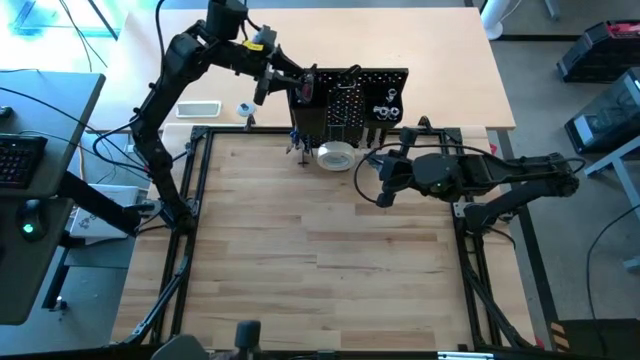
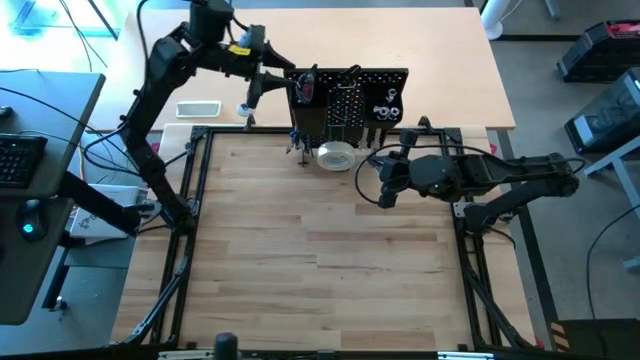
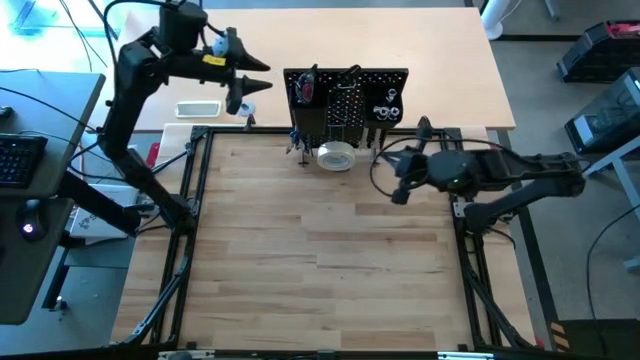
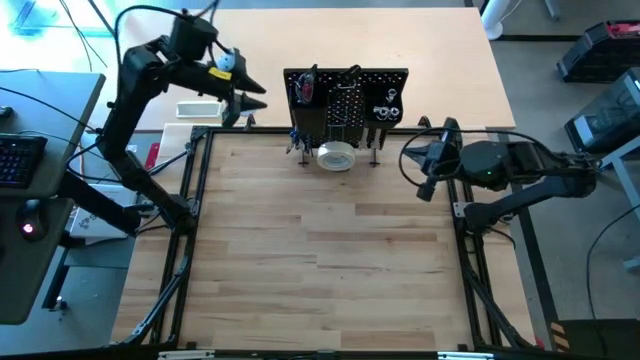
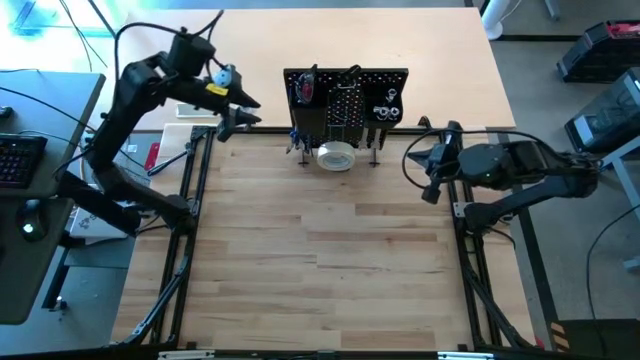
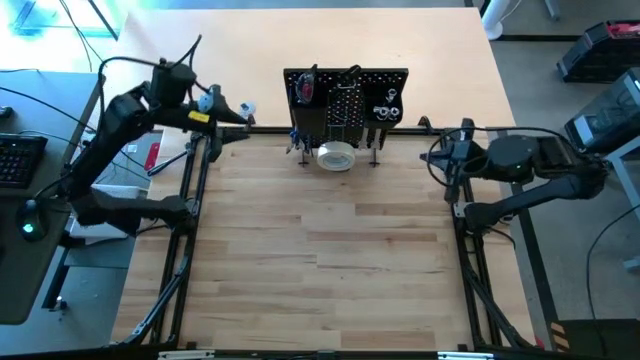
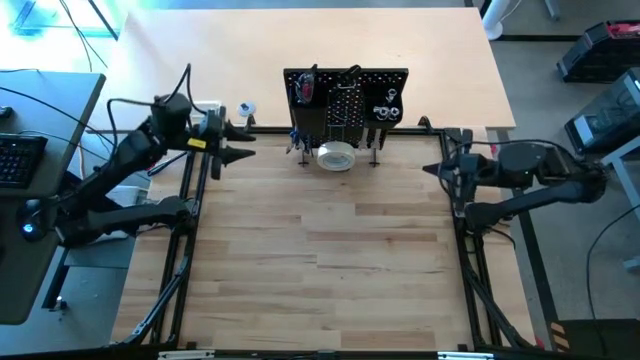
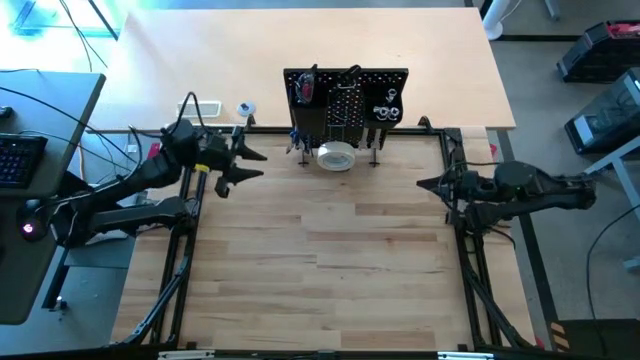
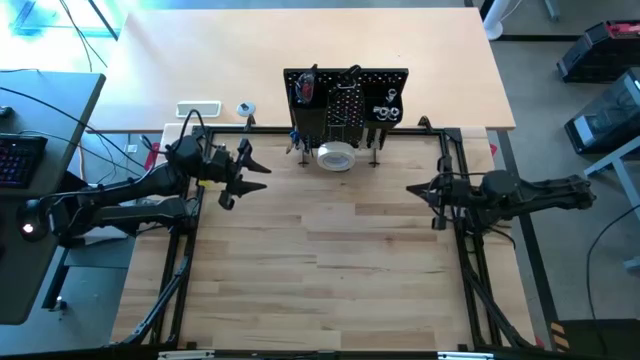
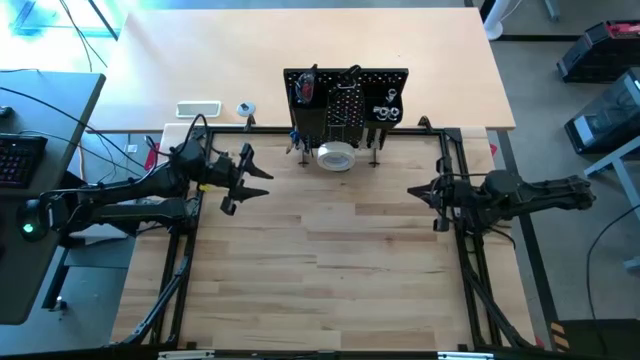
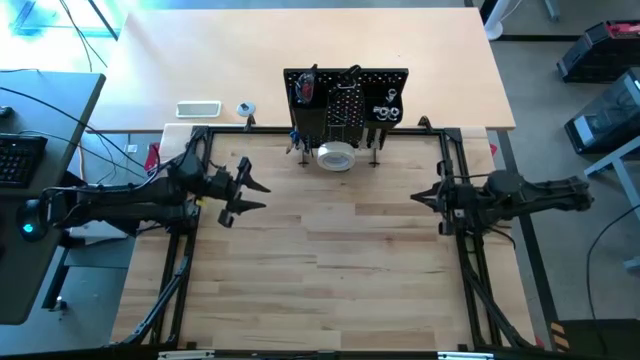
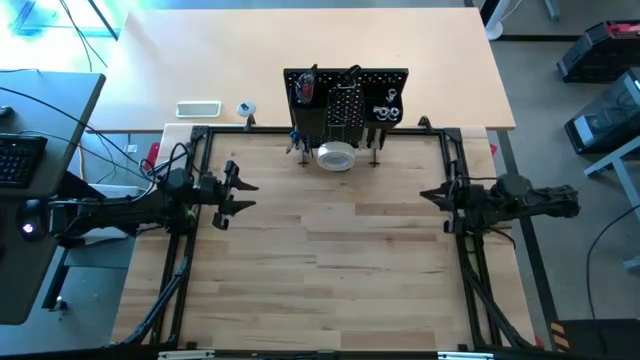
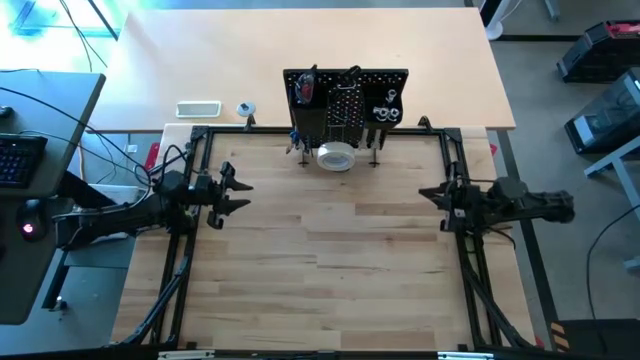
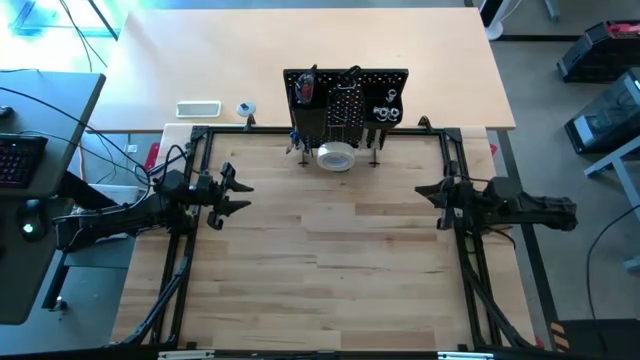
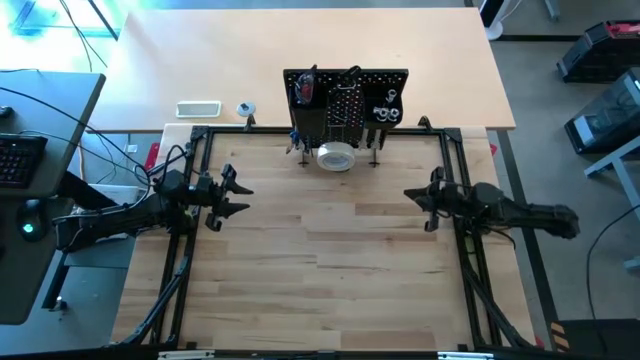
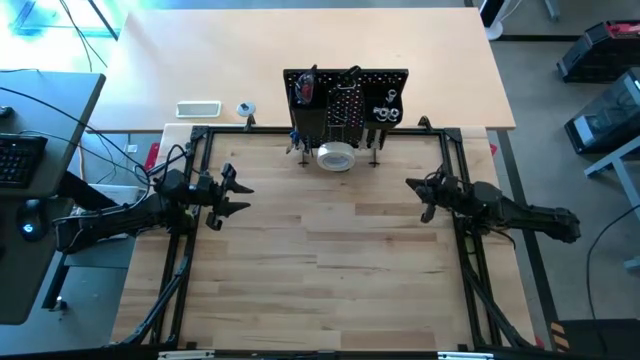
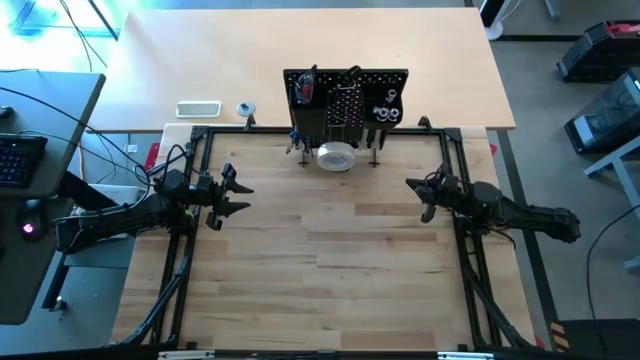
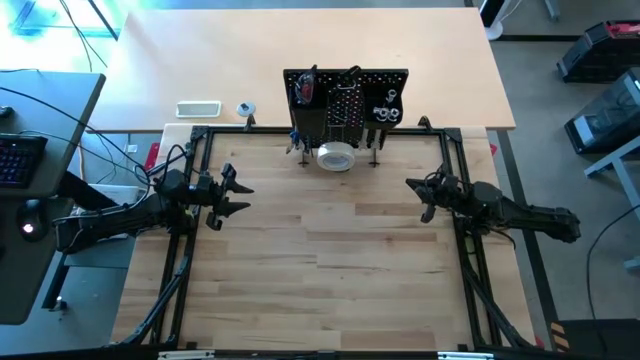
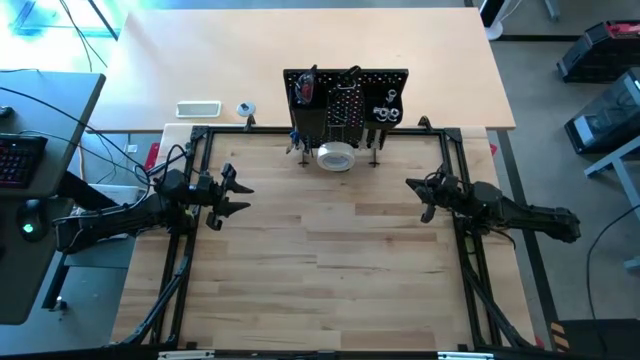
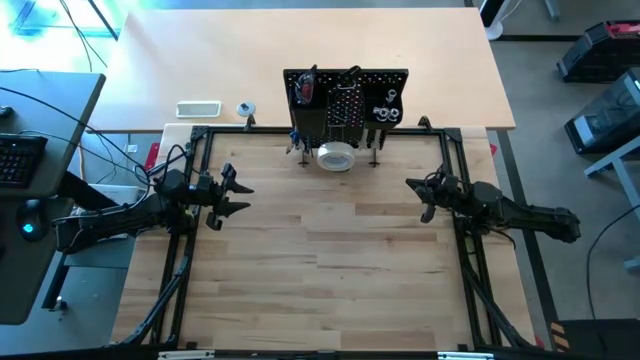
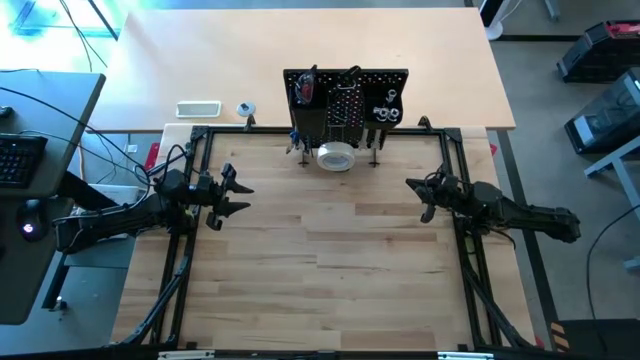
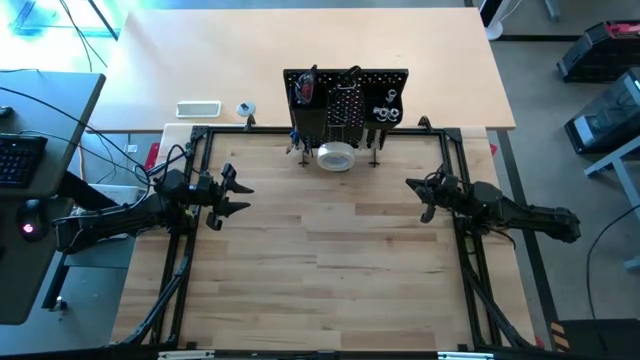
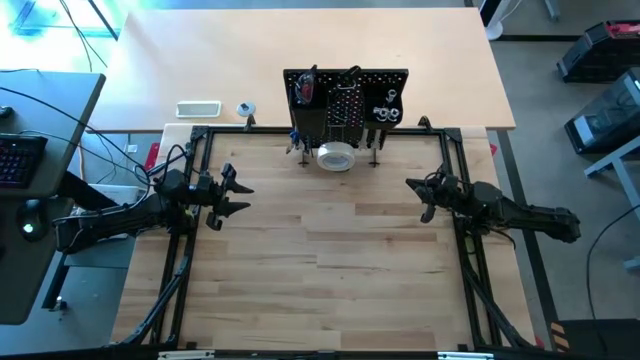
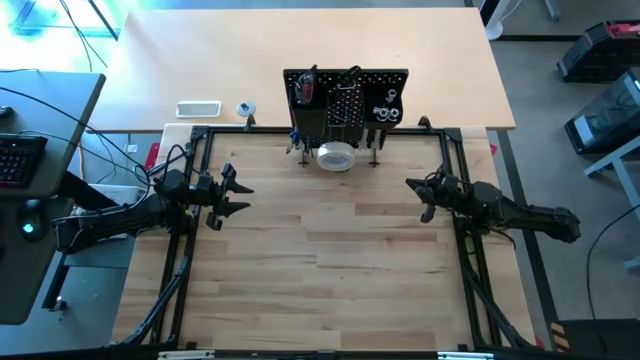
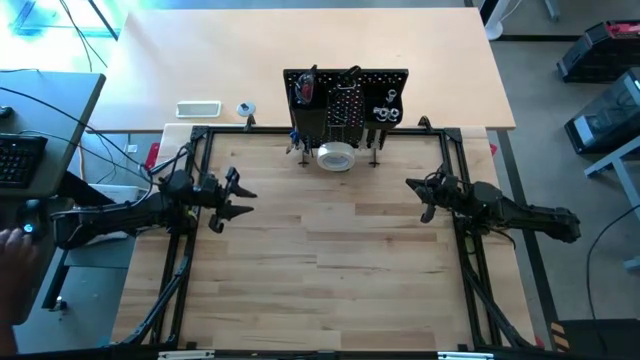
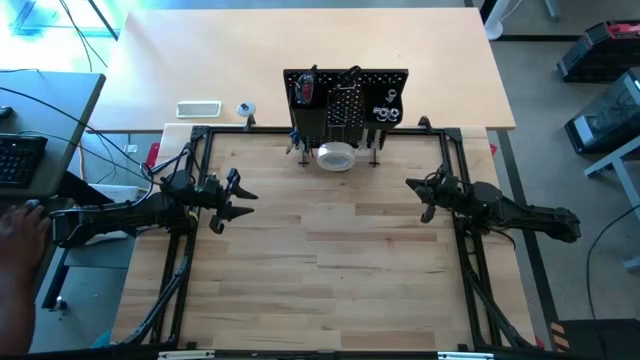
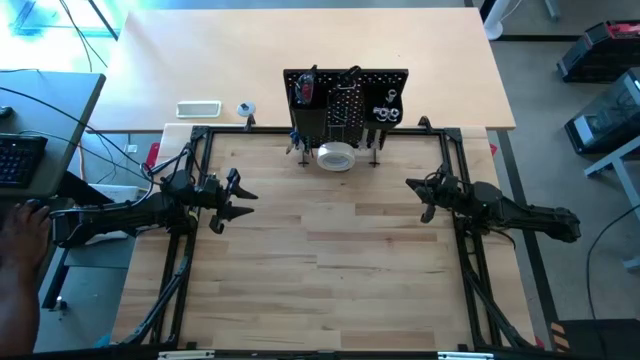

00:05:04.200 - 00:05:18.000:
Task: Hang tools onto peg board
Return to Home Position

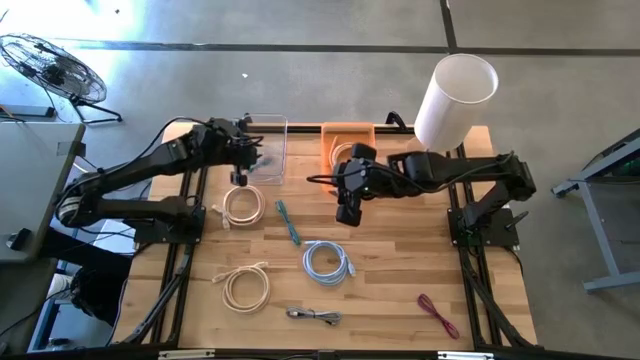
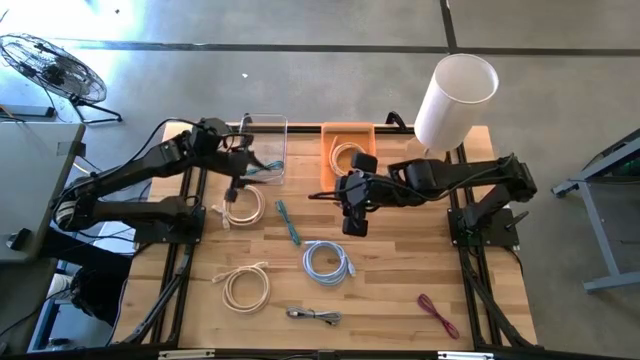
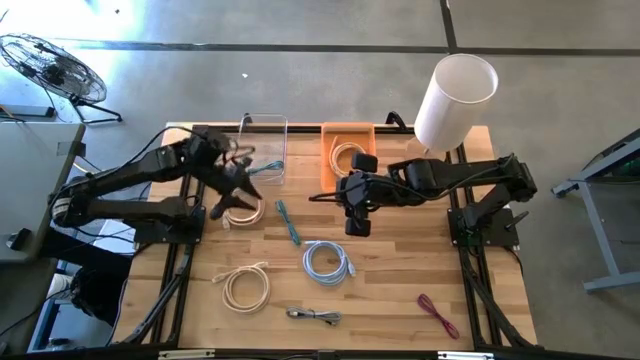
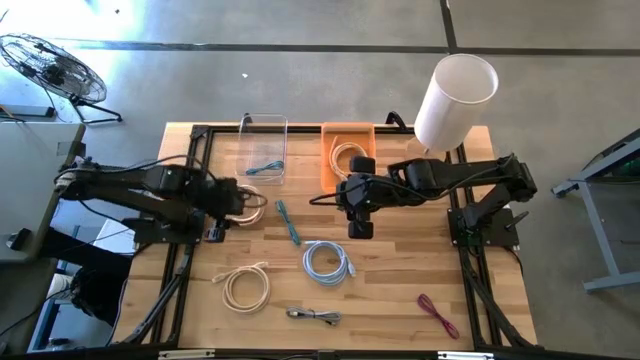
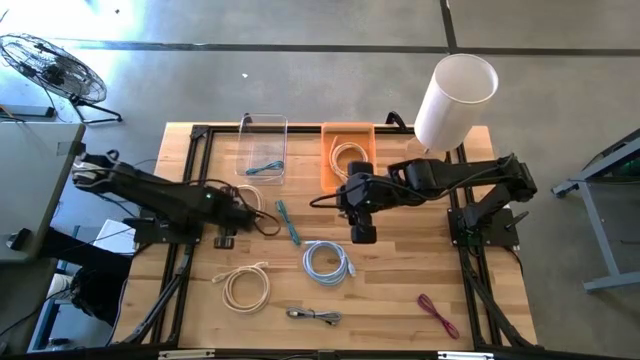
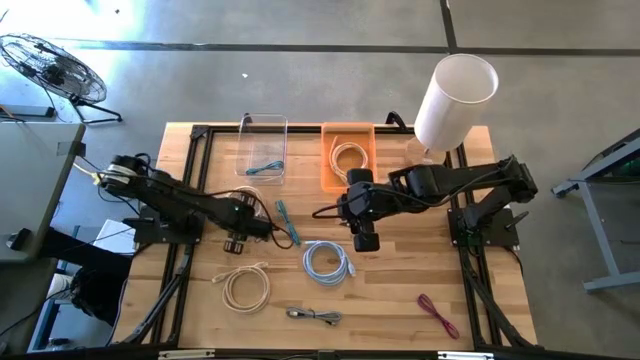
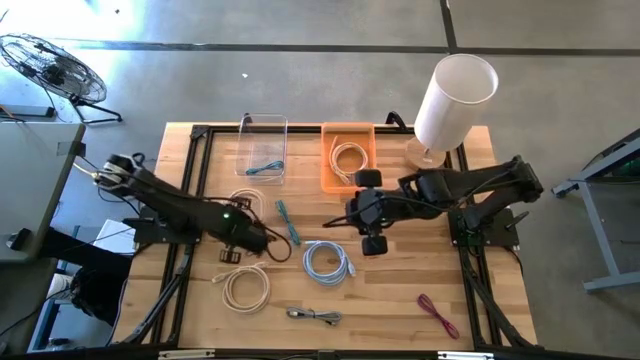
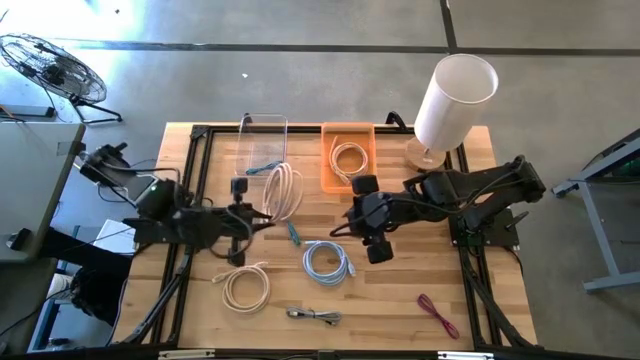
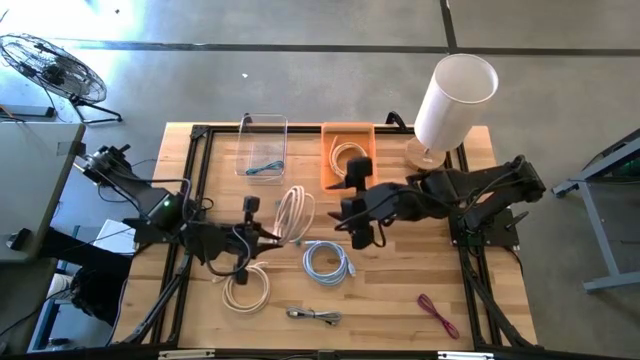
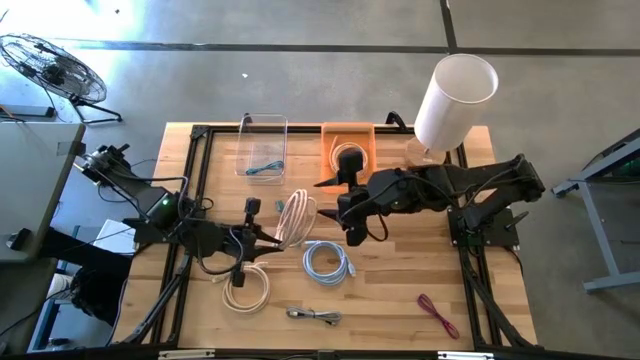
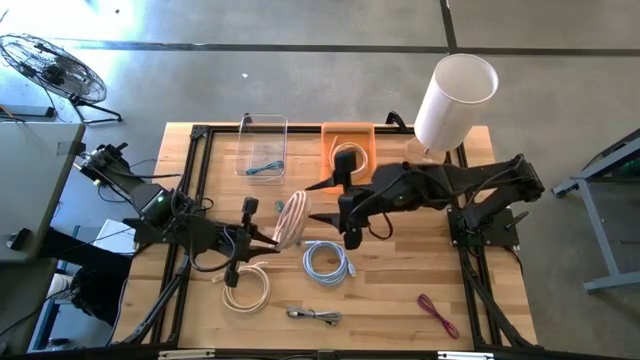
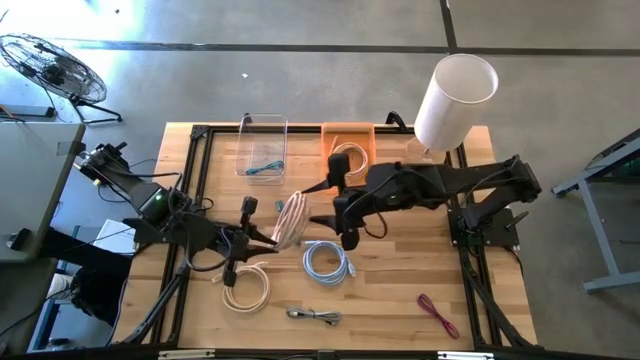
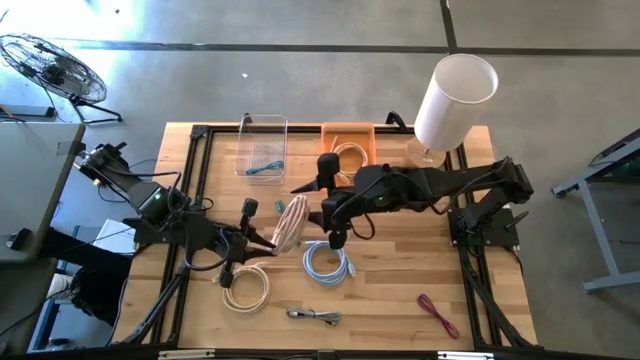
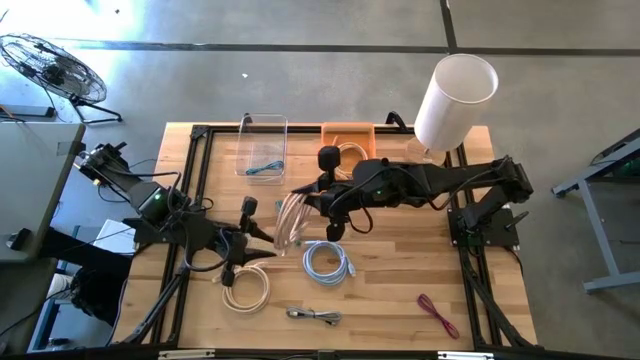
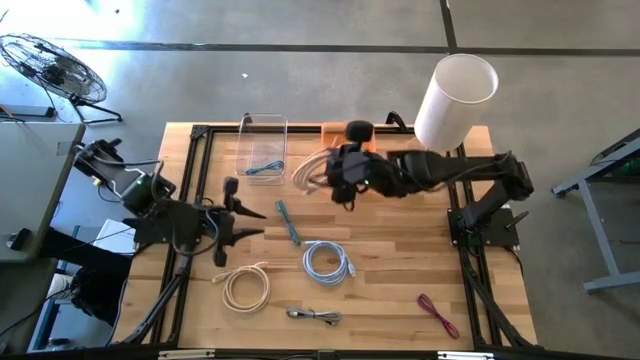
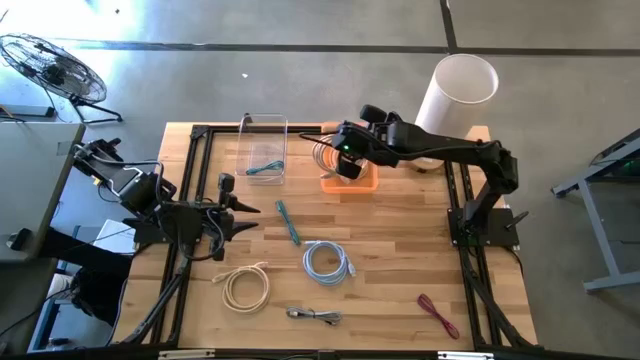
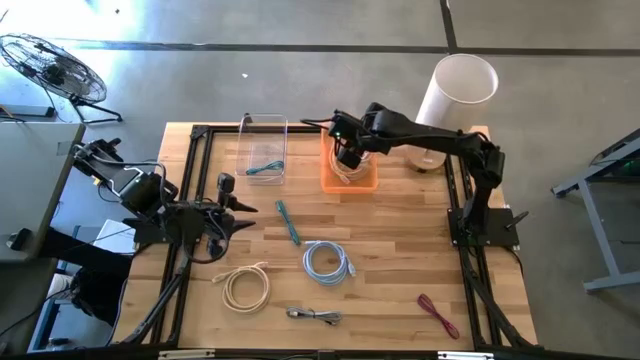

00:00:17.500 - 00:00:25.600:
Task: Pick & Place USB Port
Put the top white HDMI cable into the orange bin
